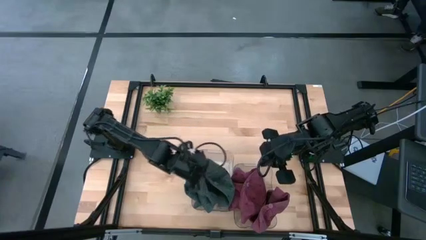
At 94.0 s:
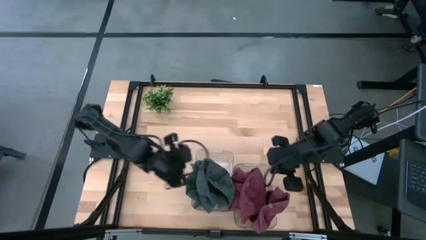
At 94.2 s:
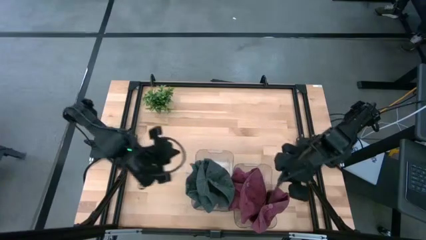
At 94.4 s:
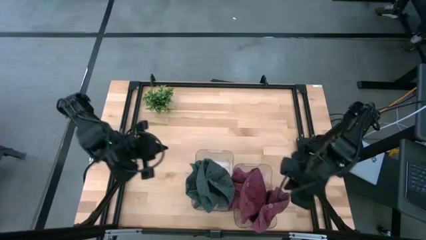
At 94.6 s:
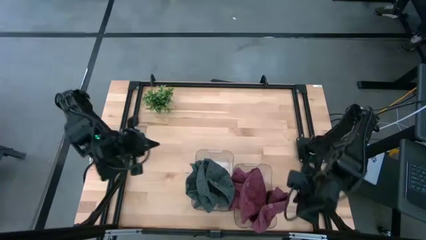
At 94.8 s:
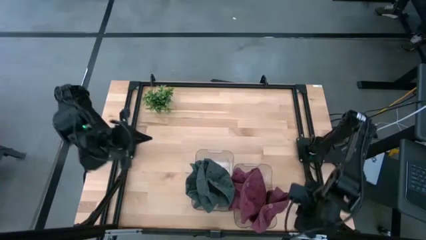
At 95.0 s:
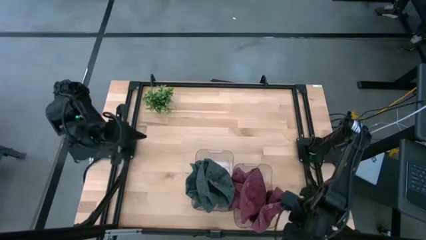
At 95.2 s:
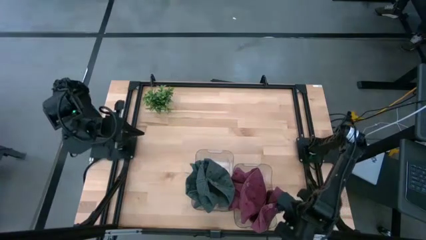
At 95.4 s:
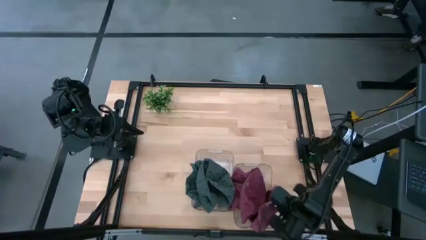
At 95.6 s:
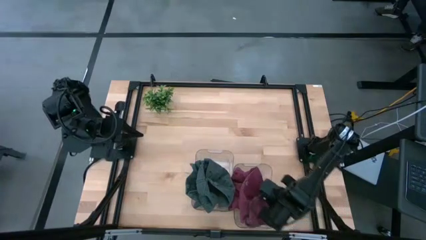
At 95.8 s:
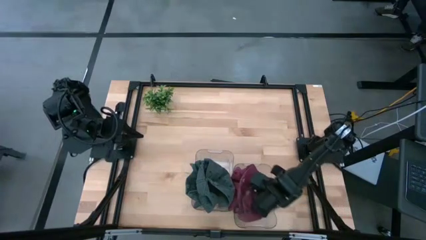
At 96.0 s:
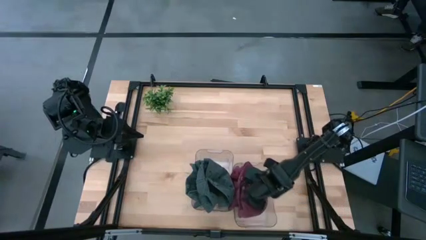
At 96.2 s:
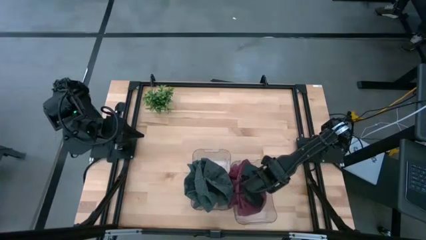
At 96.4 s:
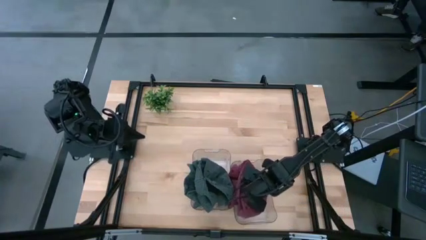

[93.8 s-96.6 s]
Task: Pick & Place hat
Adjust the red caps in the right transparent bin

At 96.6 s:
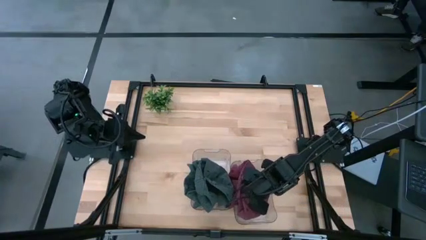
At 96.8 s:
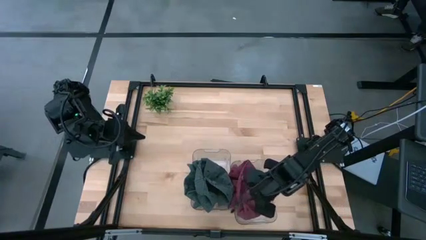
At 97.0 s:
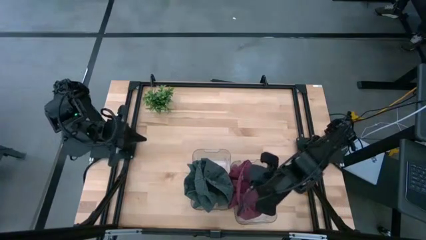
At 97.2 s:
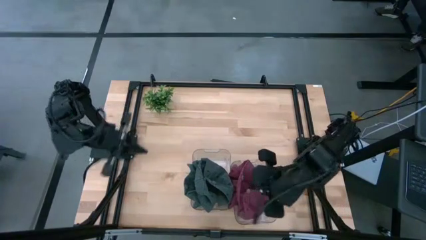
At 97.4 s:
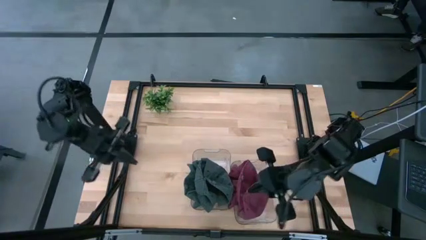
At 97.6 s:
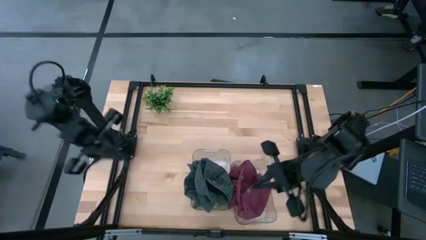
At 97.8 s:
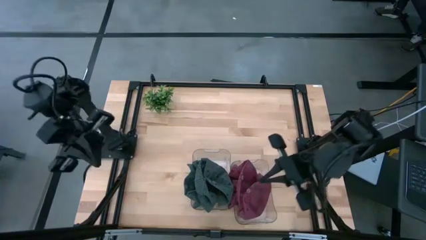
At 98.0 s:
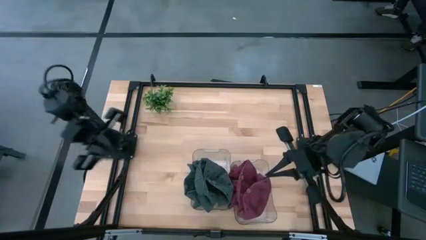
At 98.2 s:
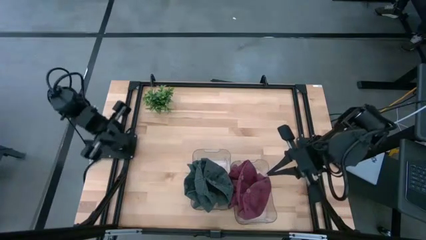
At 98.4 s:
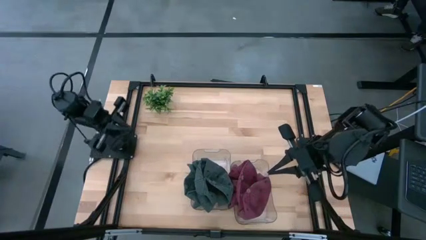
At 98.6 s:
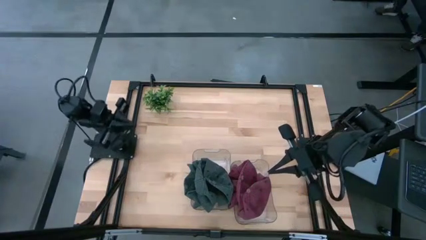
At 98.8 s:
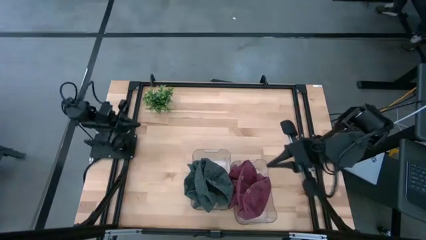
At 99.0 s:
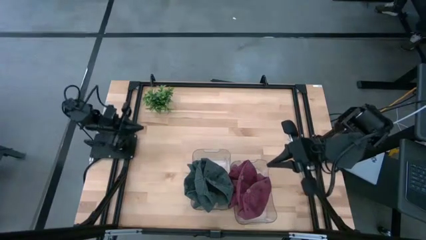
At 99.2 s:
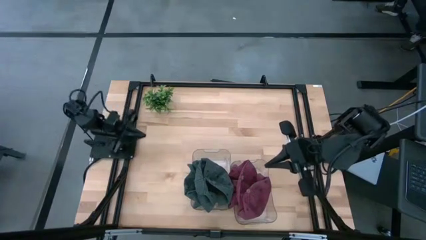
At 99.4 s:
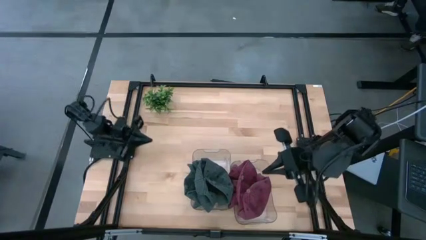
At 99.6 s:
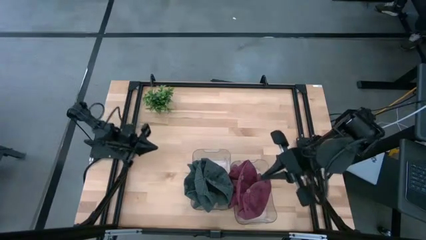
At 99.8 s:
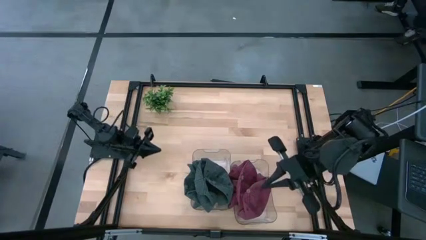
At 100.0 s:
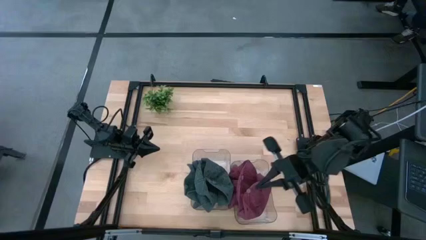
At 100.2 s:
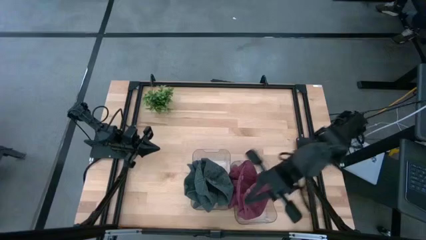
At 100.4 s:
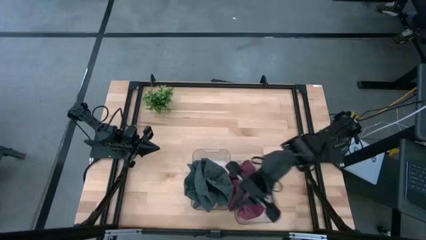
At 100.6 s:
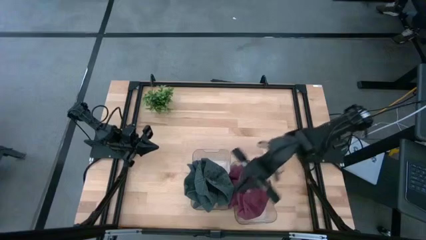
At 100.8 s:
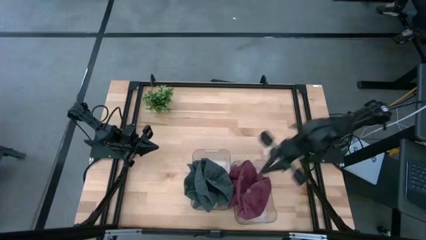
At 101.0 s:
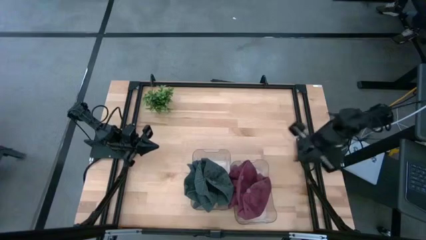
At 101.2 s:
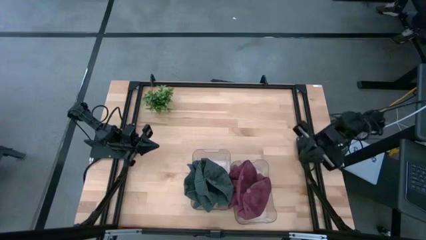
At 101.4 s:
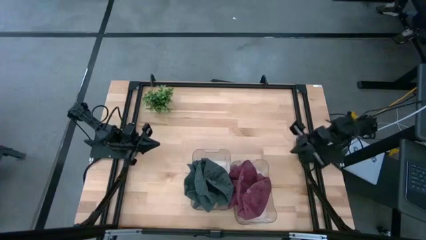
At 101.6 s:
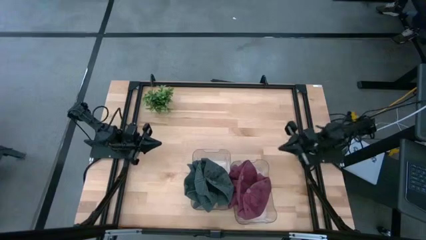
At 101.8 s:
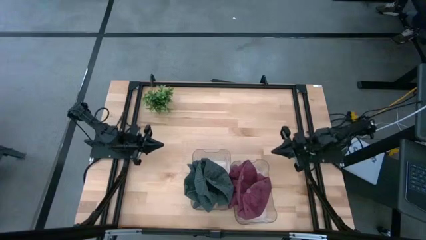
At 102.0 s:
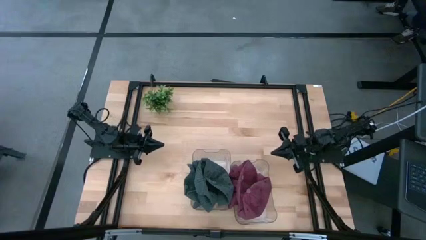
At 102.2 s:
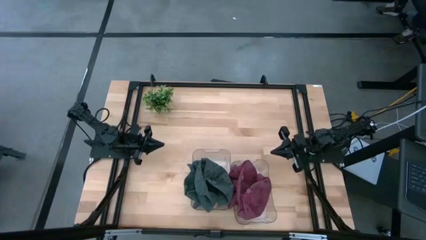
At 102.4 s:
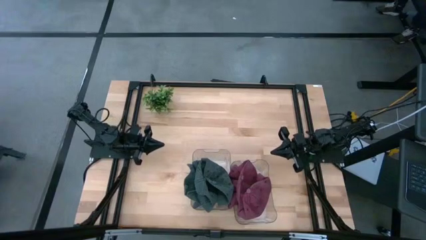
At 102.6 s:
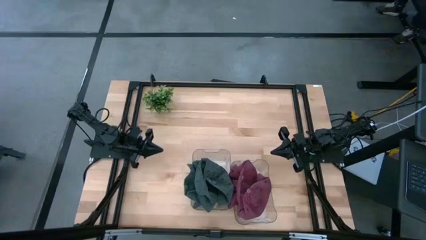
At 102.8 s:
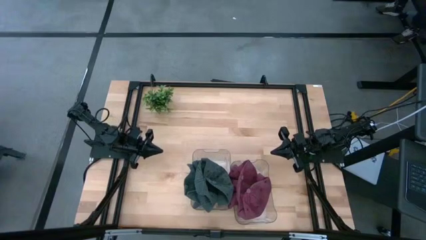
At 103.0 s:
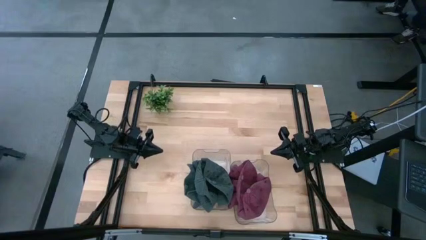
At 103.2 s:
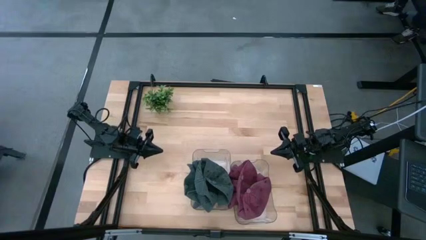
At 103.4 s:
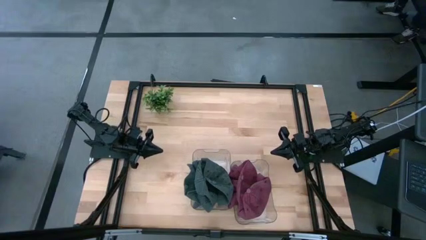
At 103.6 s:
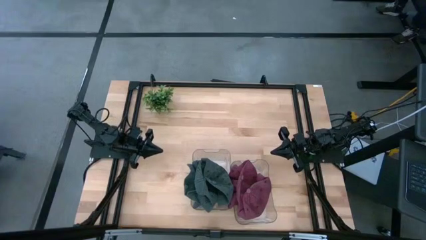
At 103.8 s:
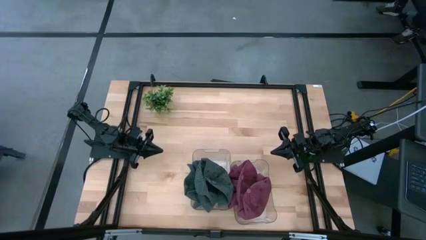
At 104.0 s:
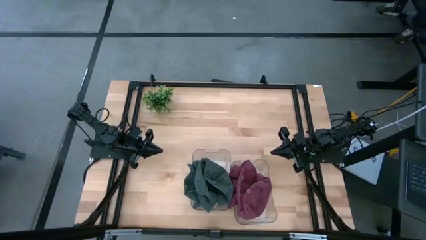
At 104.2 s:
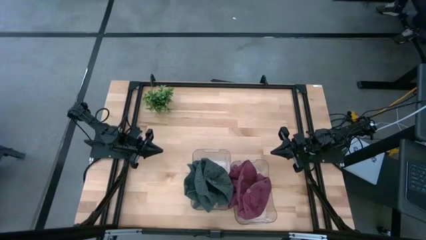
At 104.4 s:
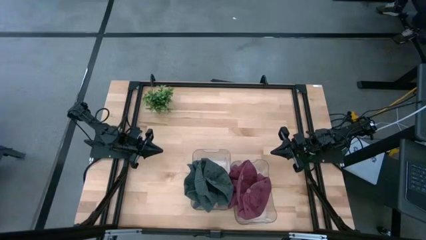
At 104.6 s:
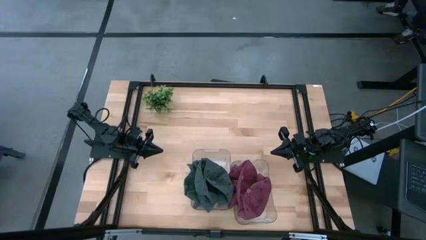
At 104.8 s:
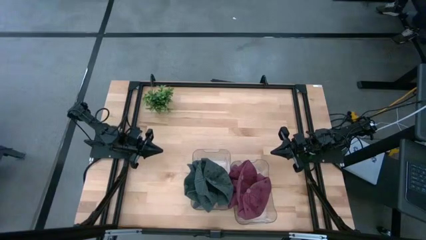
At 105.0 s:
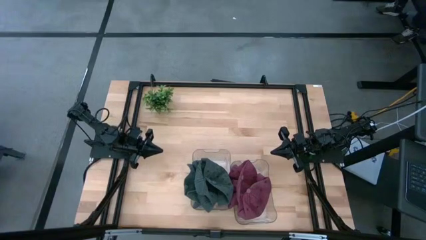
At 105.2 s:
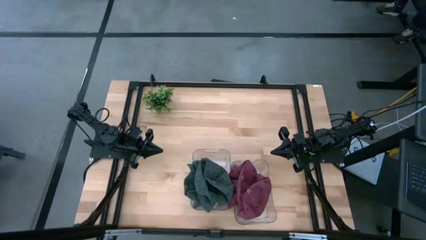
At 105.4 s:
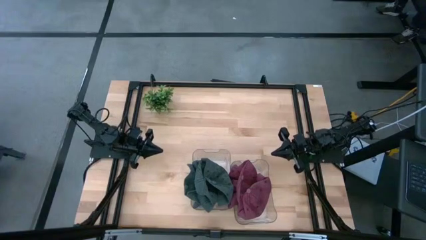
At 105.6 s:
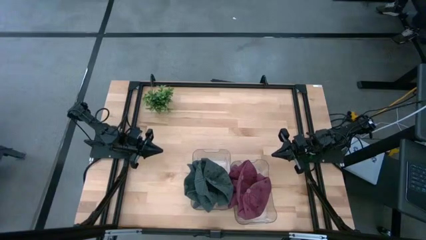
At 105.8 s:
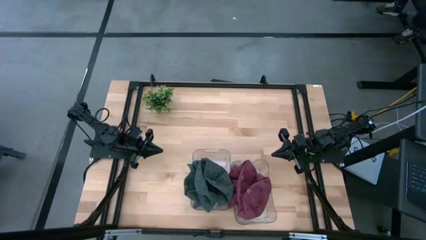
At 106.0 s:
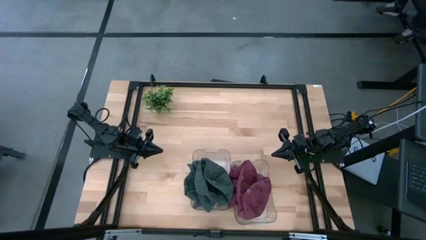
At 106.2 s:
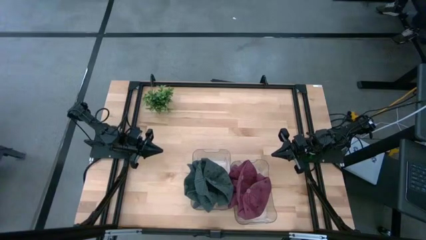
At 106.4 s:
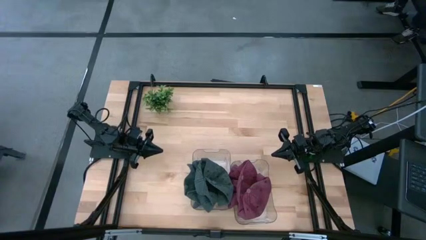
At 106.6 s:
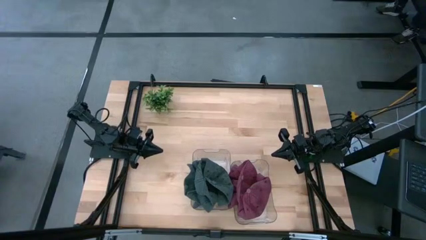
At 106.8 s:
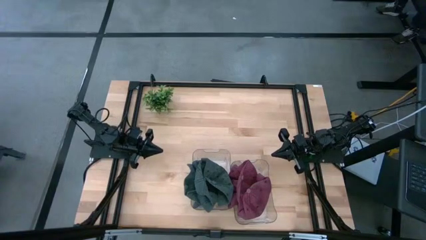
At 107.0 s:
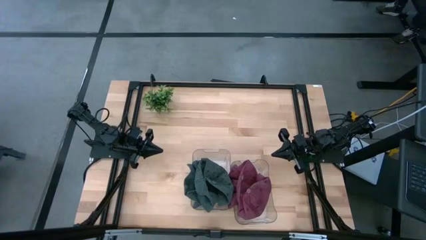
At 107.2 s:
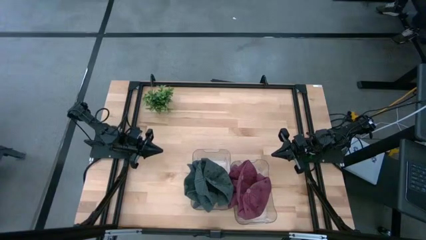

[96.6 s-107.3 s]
Return to Home Position

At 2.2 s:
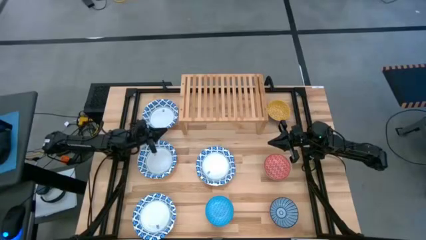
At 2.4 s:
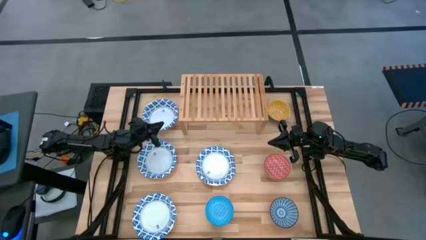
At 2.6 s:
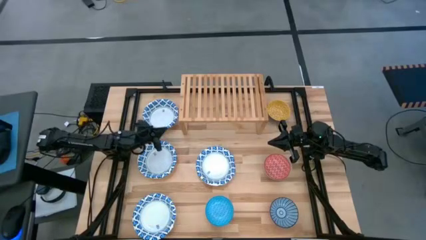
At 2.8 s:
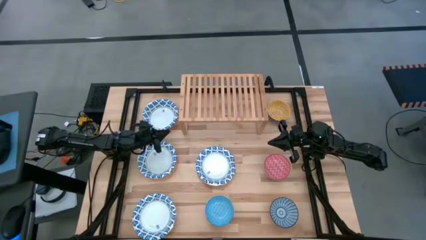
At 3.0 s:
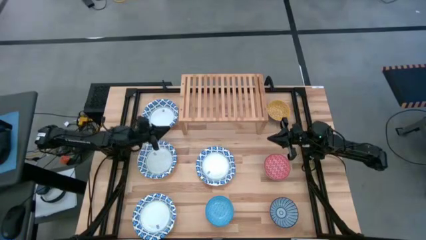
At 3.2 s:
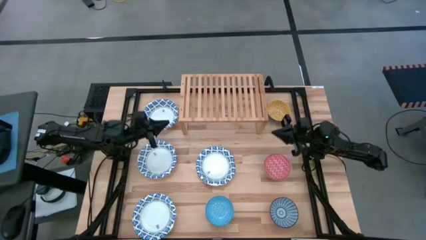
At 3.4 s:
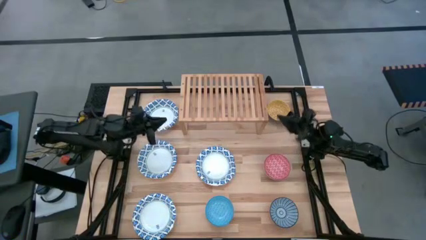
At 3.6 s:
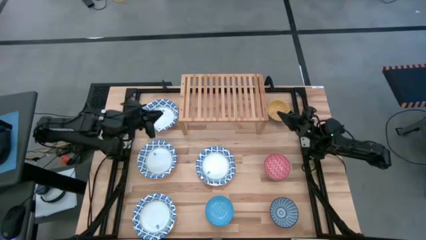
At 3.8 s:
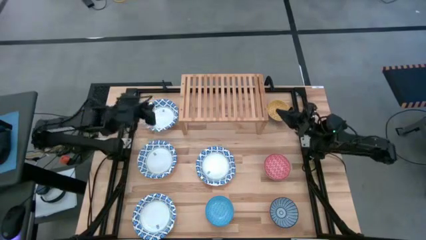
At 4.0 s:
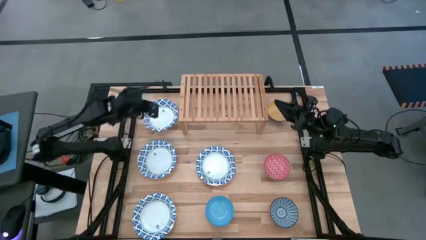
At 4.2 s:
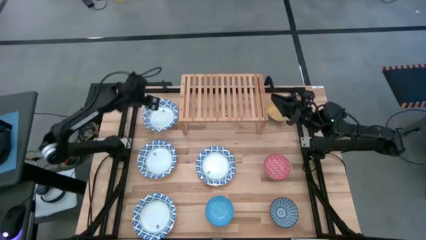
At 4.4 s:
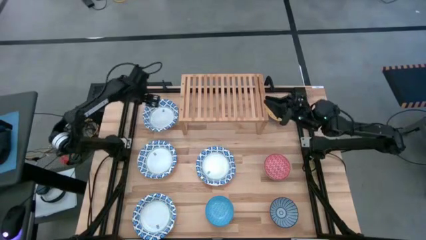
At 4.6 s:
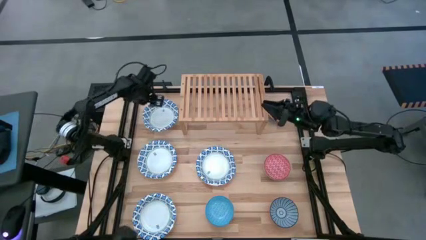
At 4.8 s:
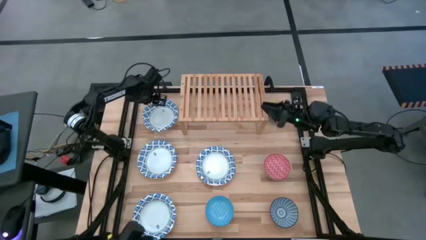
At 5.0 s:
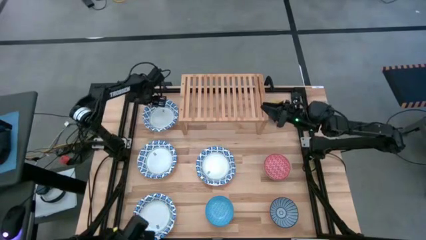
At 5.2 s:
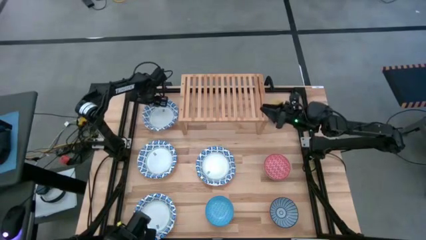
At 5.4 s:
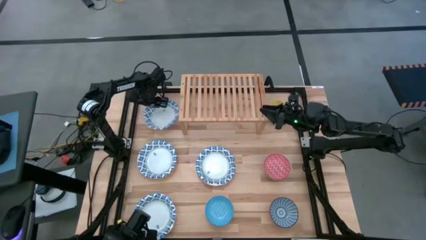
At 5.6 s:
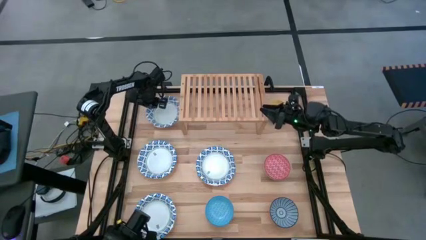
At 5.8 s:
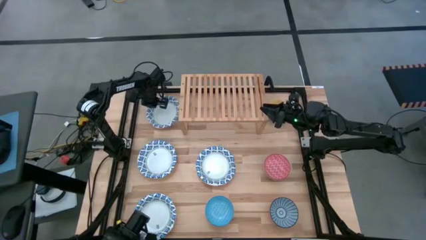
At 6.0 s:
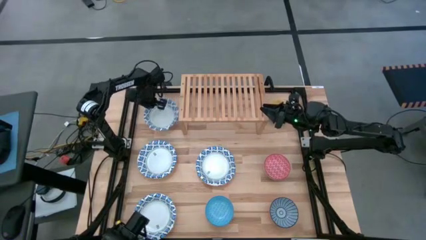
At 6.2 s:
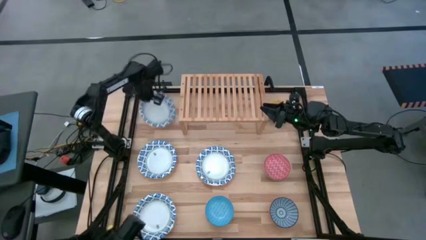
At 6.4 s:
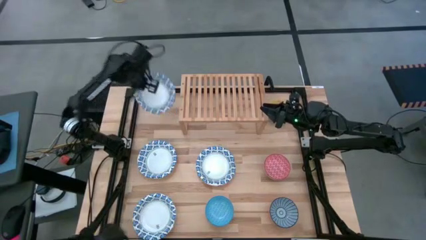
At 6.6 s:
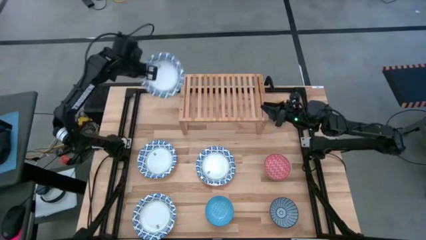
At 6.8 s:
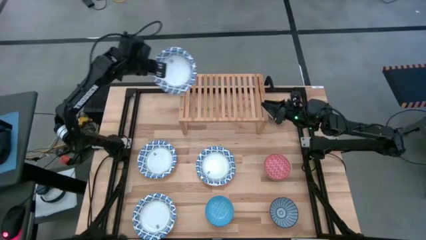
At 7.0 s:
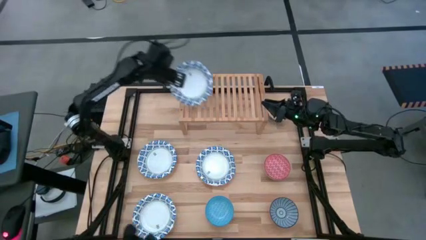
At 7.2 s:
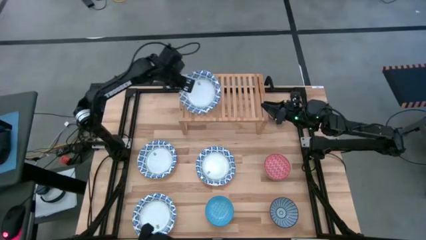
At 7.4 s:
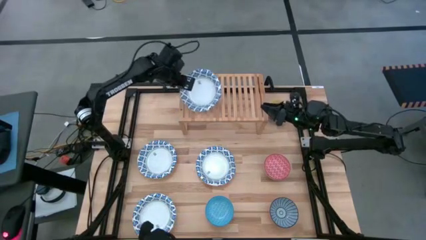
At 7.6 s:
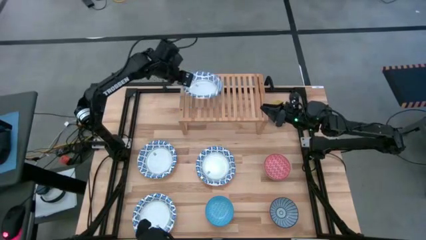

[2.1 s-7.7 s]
Task: Place and stack bowls onto a shelf
Put the top white bowl on the shelf
